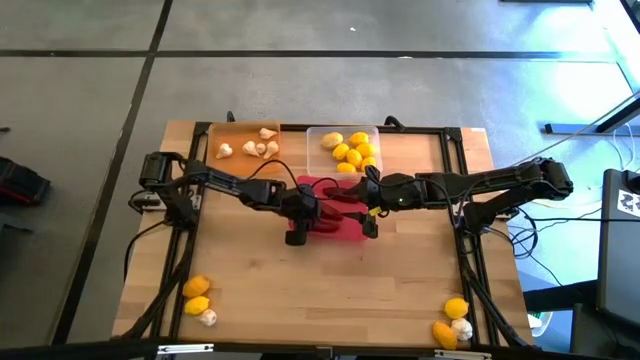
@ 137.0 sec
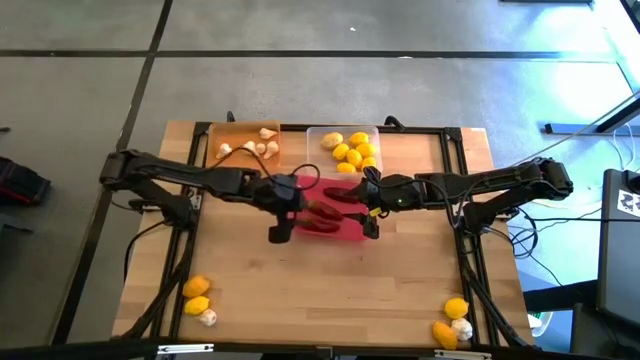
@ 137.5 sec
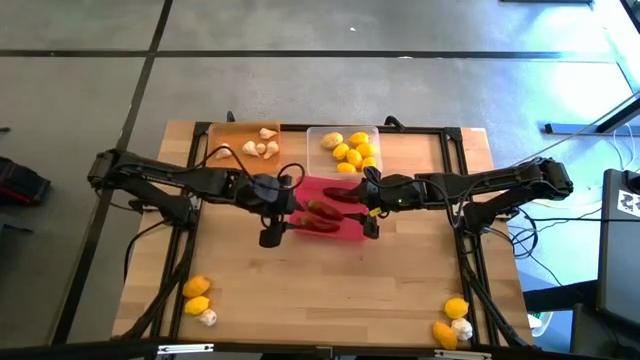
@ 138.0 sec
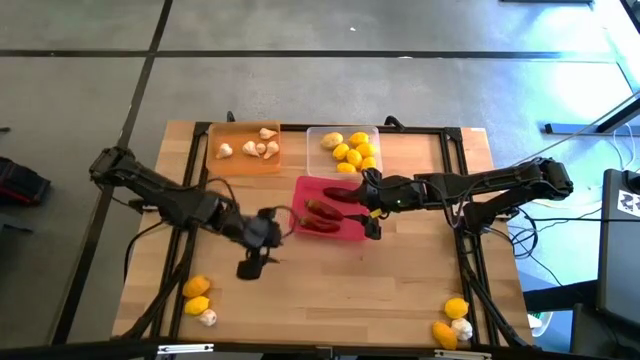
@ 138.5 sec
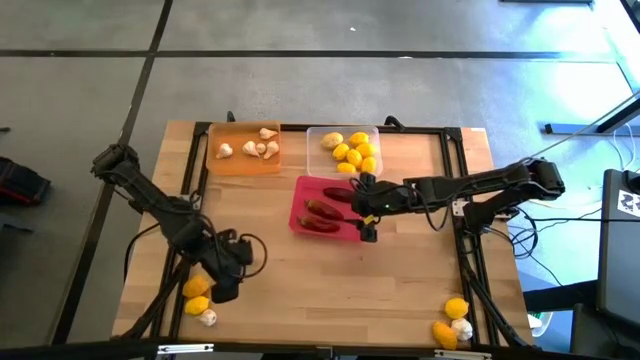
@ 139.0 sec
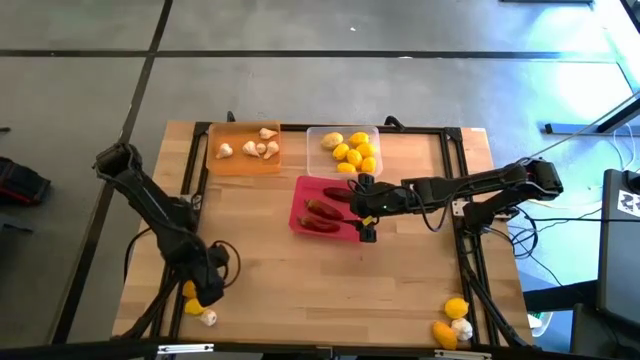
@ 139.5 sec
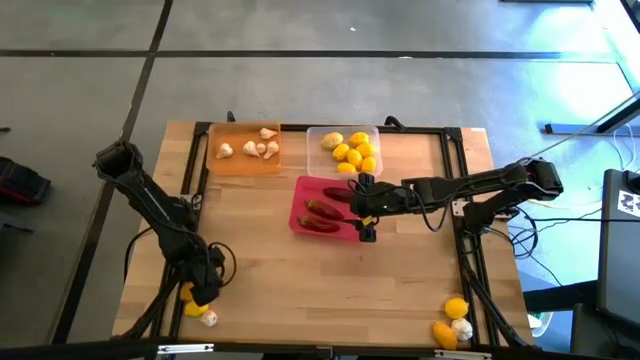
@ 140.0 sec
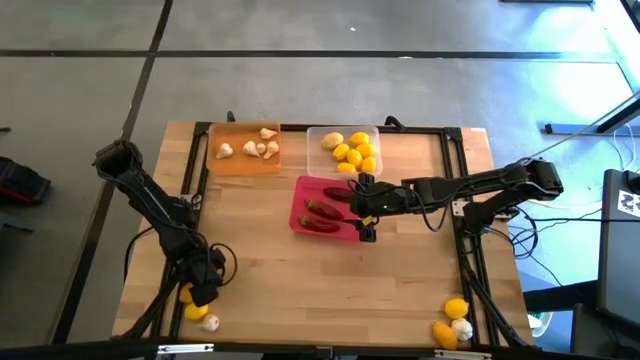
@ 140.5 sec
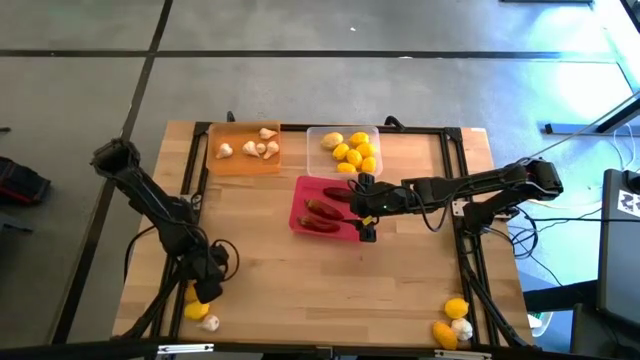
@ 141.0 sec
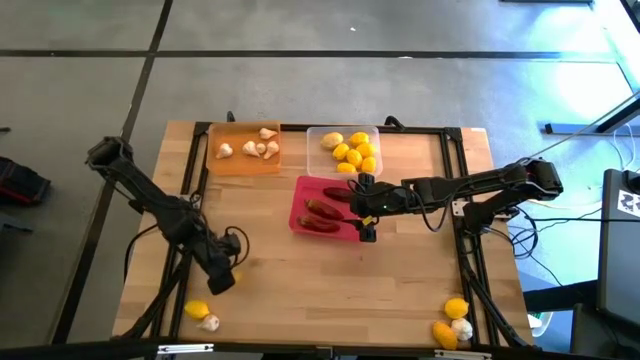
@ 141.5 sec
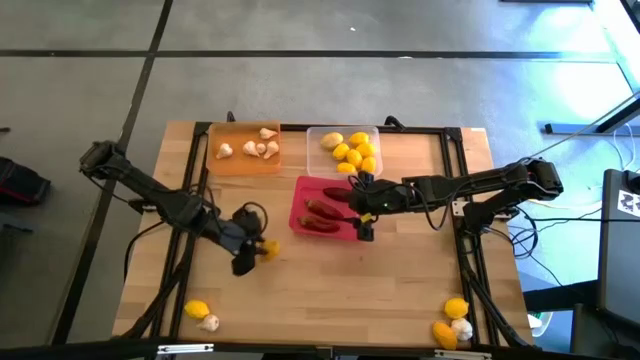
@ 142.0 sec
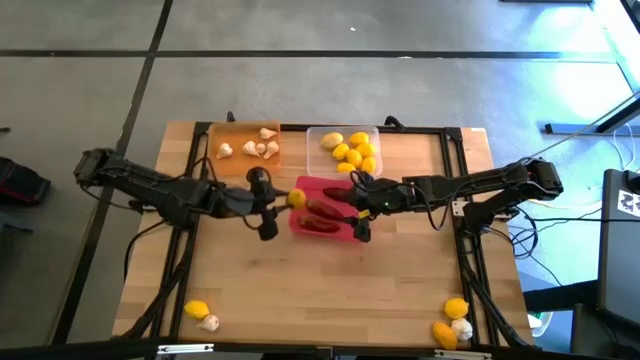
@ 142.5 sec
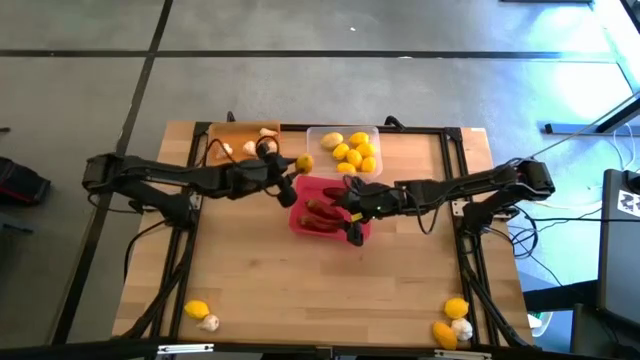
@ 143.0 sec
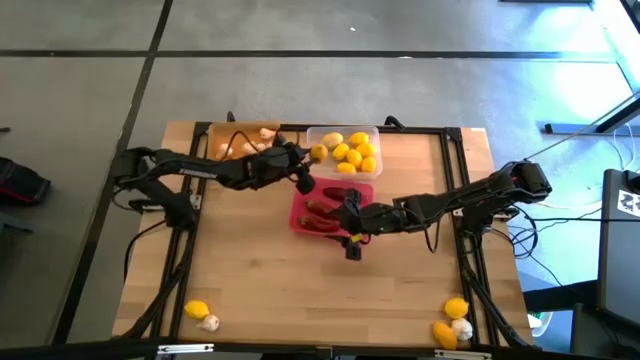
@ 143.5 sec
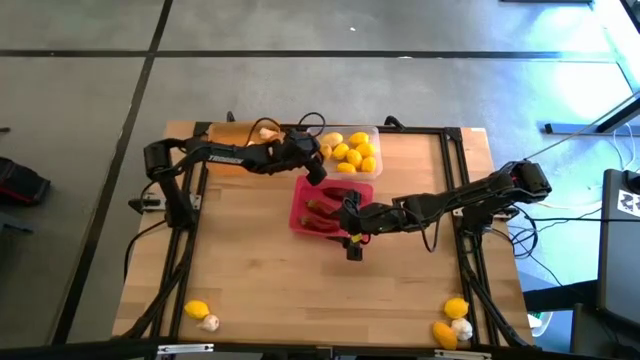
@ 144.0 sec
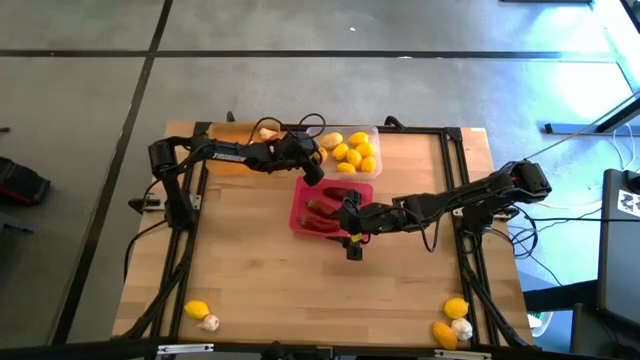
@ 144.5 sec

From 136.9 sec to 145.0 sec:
Task: Sort produce into baskets
Put the yellow lemon in the transparent bin

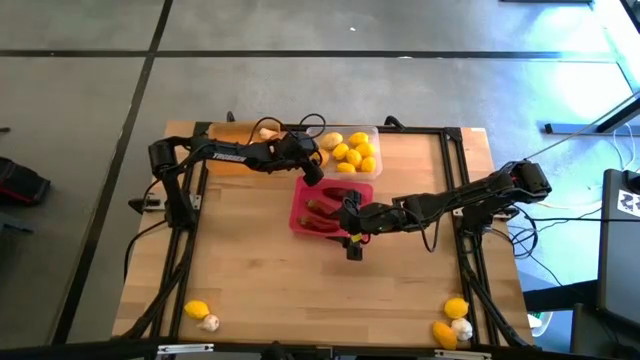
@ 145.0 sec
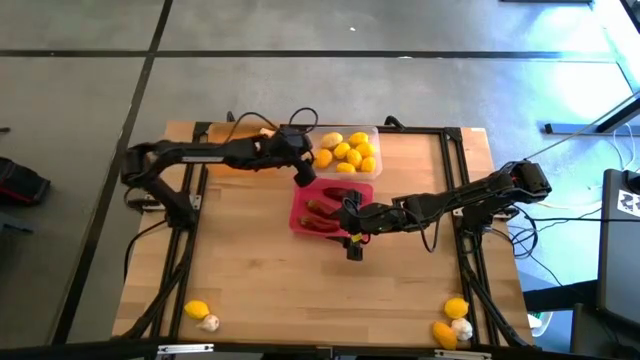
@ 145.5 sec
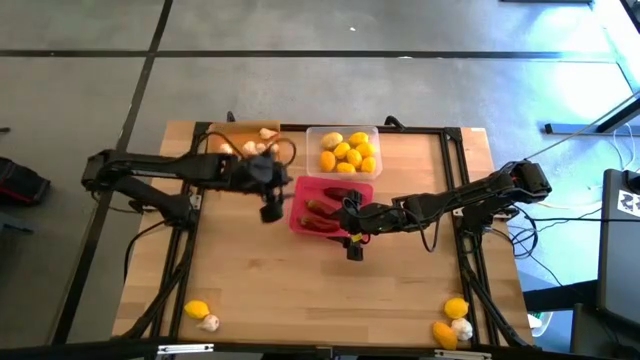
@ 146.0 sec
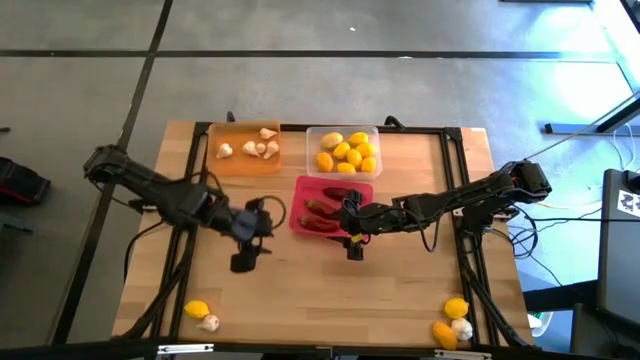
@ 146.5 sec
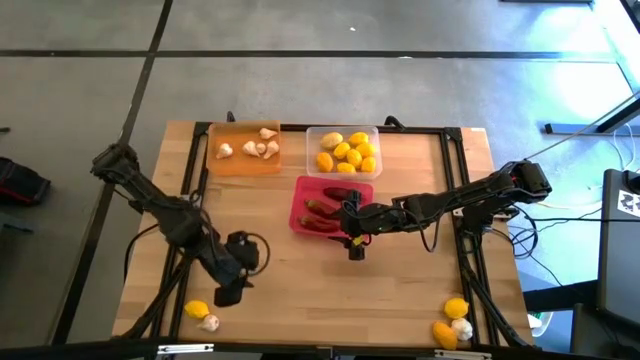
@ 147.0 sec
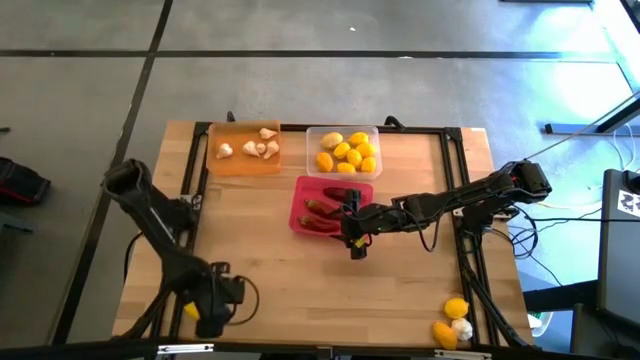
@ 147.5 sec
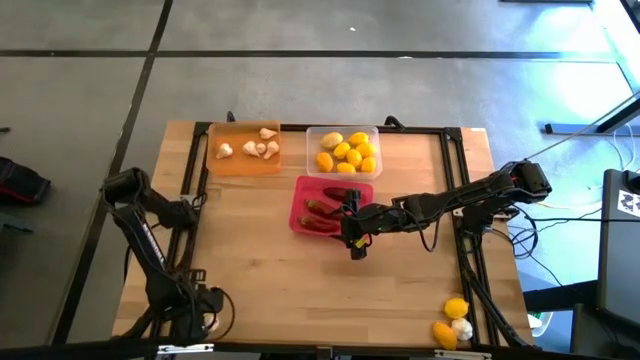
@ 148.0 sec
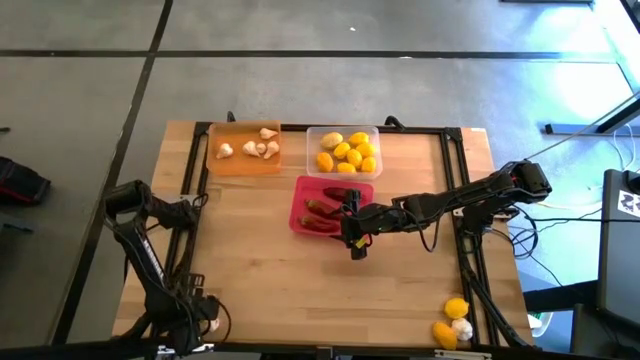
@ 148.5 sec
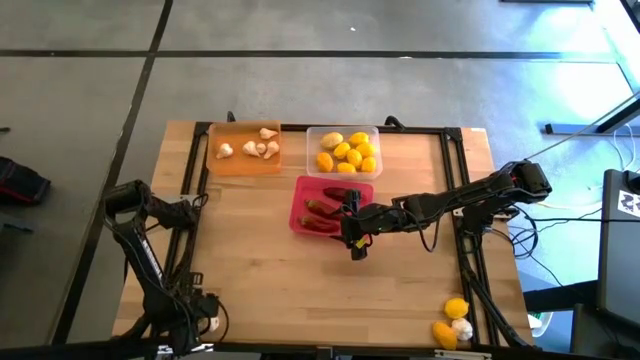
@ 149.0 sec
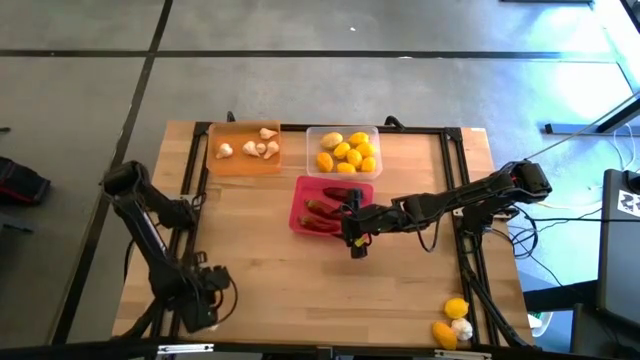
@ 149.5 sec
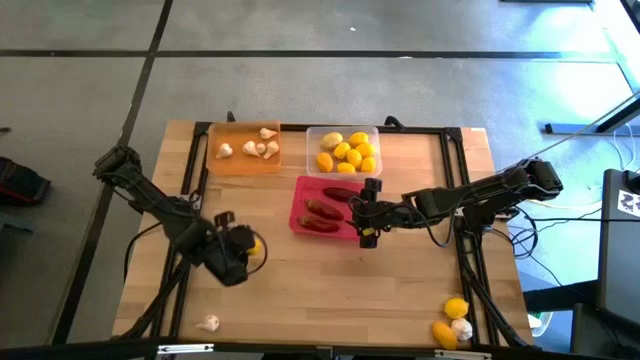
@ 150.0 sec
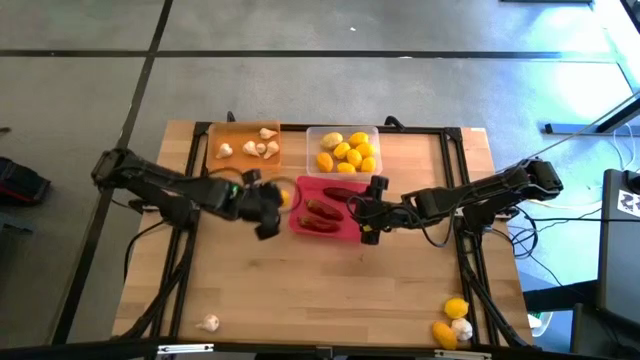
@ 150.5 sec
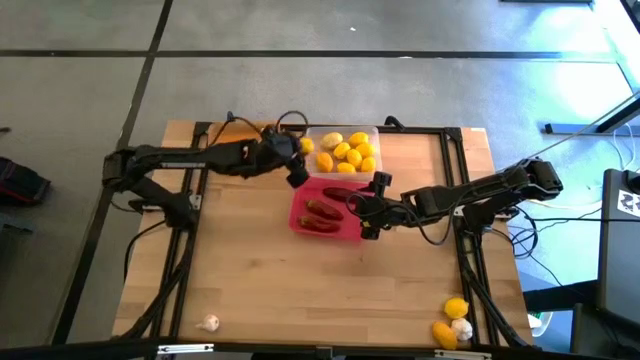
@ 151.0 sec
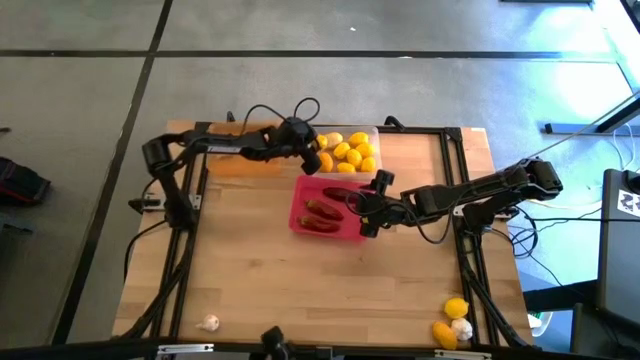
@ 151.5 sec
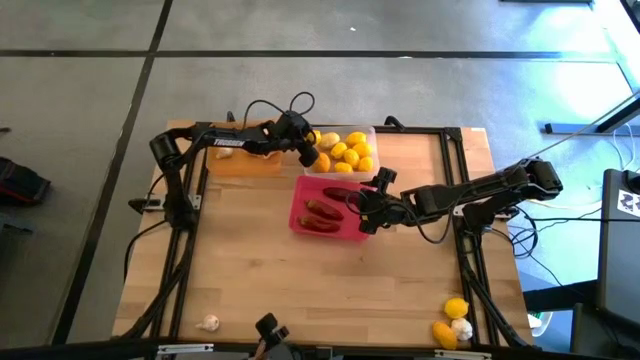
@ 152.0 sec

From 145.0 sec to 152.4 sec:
Put the yellow lemon in the transparent bin

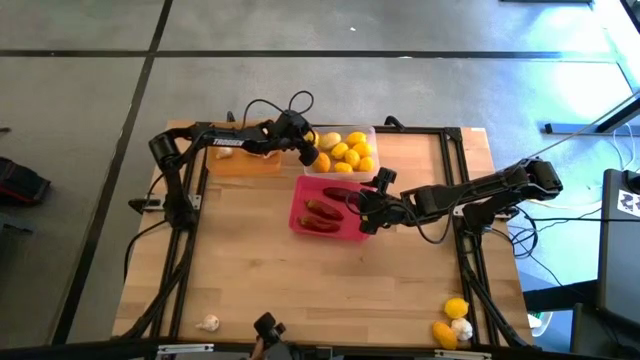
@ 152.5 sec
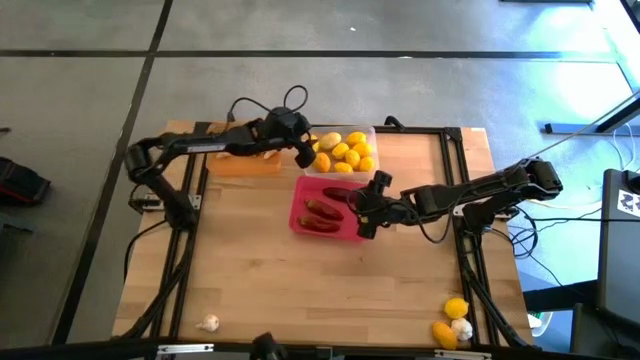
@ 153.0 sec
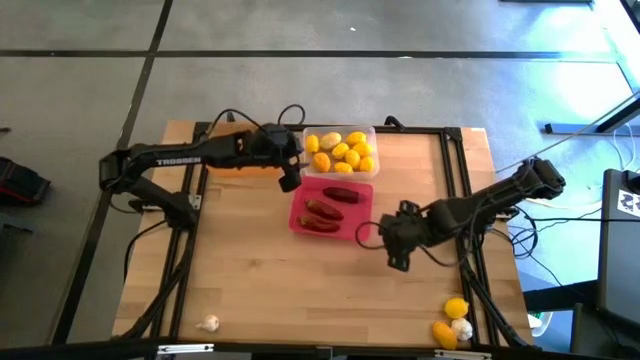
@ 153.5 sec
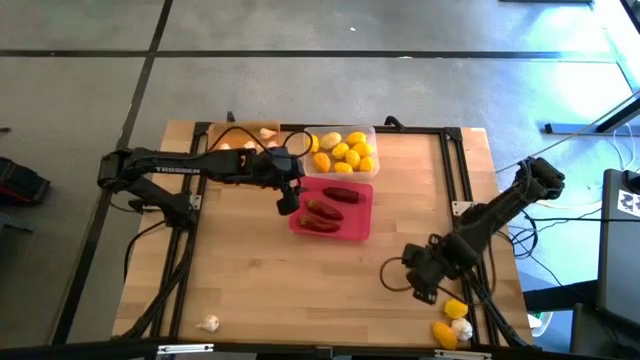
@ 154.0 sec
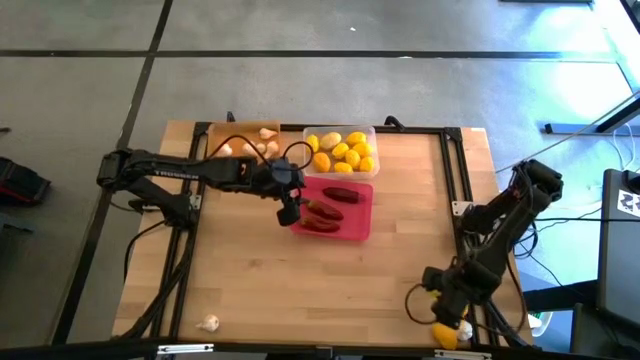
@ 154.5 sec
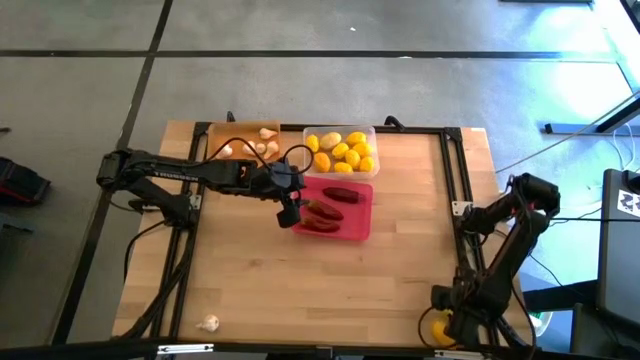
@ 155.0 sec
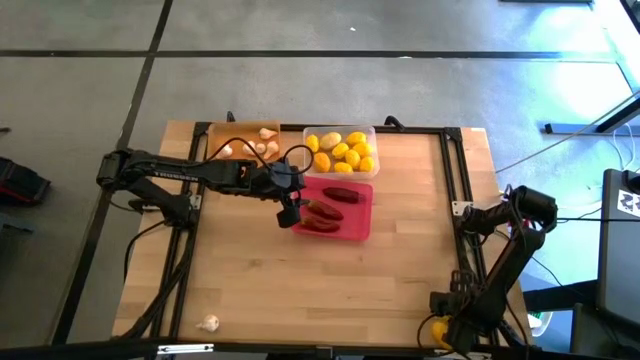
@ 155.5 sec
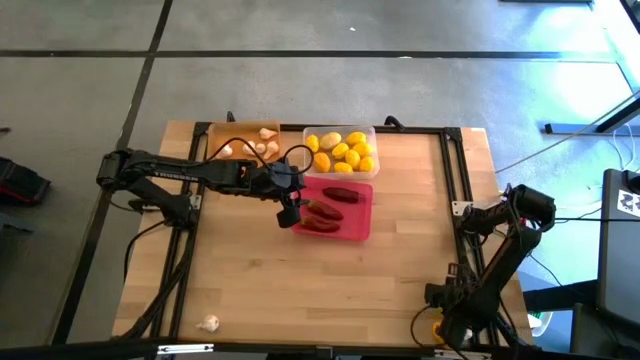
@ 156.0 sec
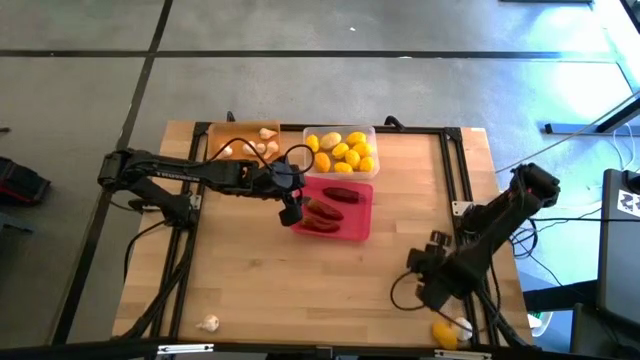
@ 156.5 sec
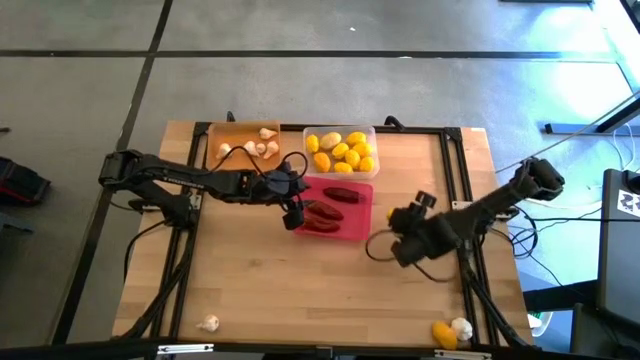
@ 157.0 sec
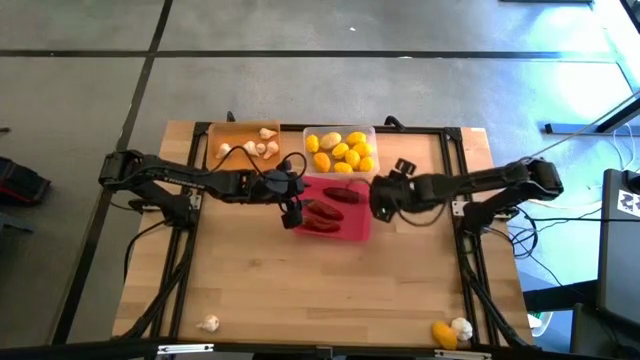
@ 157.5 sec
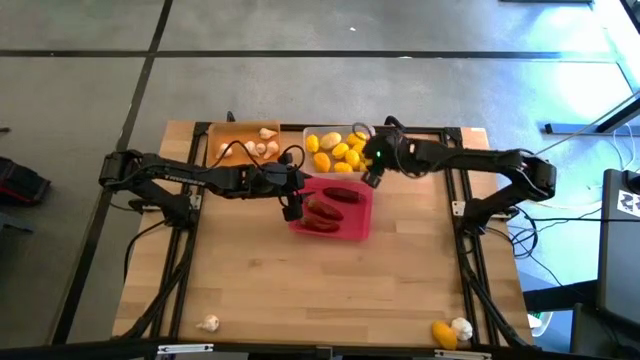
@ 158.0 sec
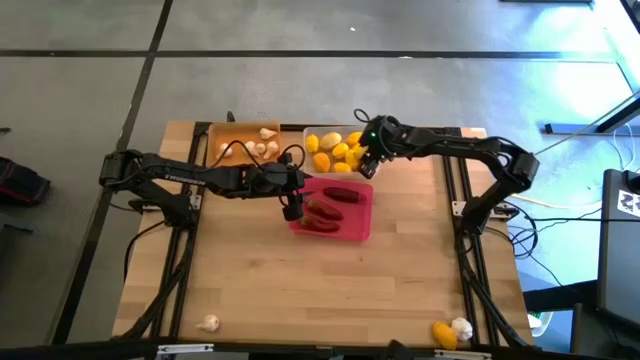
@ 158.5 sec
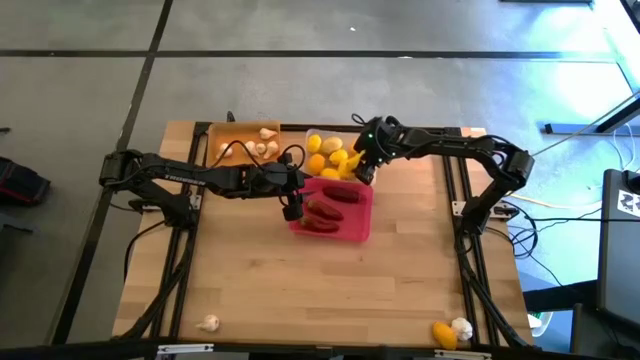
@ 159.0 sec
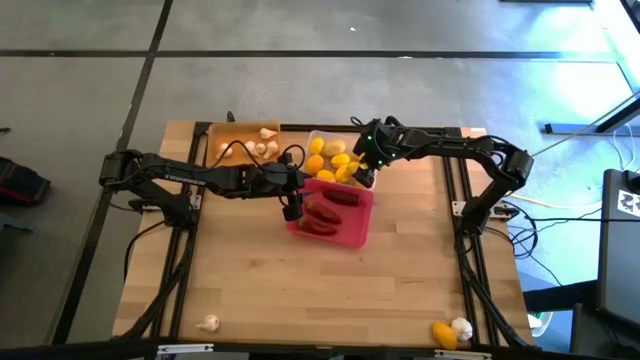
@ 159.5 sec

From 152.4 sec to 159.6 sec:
Put the yellow lemon in the transparent bin
